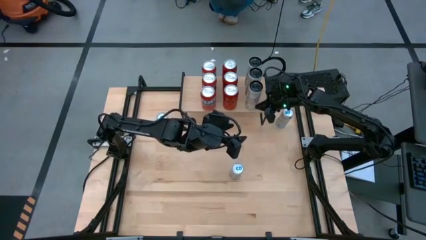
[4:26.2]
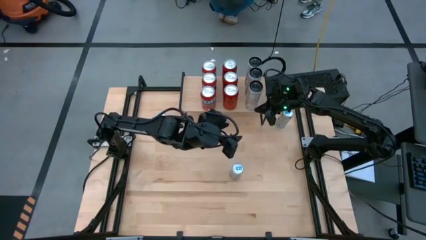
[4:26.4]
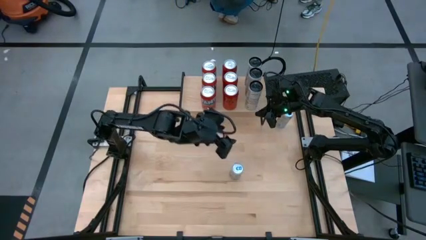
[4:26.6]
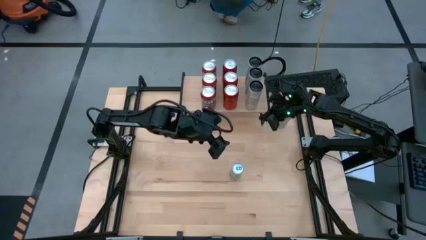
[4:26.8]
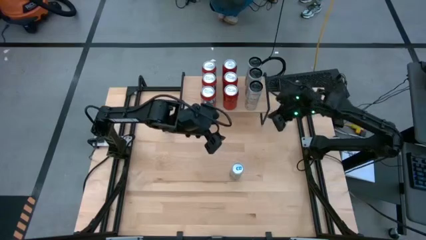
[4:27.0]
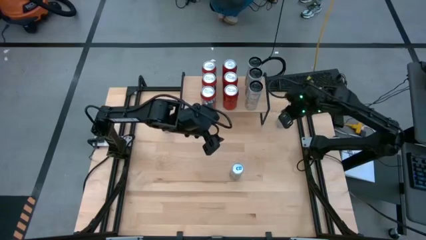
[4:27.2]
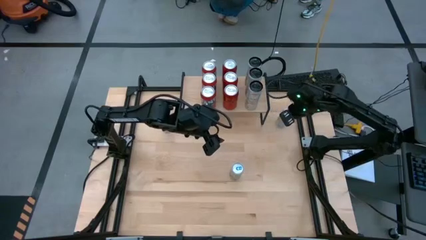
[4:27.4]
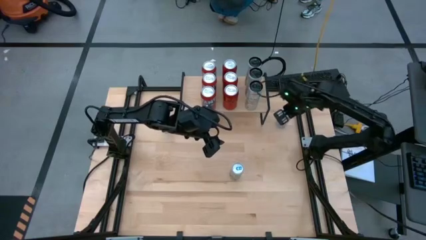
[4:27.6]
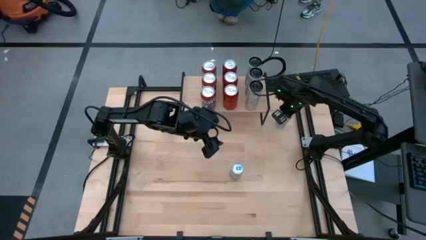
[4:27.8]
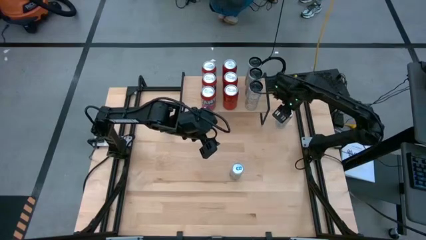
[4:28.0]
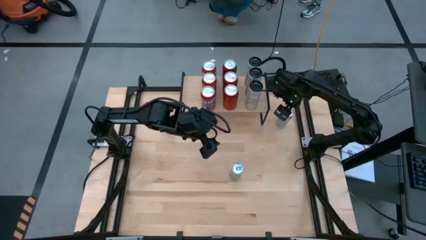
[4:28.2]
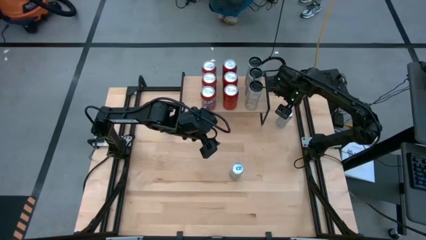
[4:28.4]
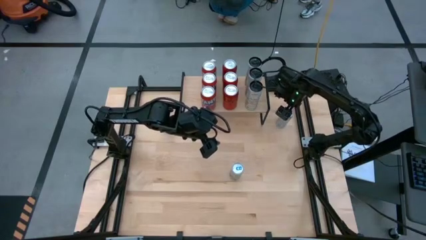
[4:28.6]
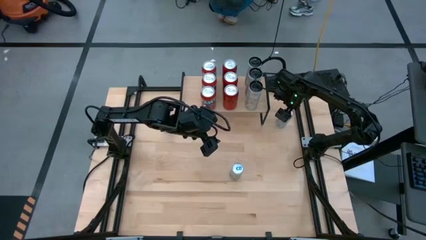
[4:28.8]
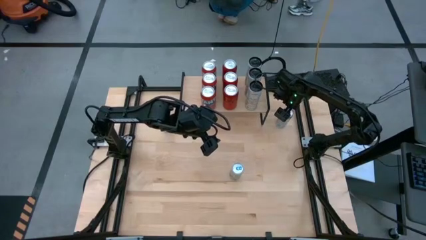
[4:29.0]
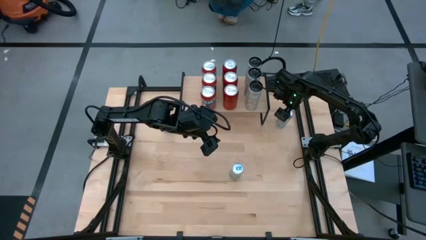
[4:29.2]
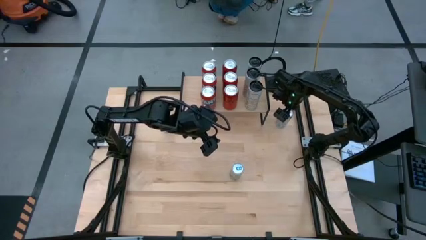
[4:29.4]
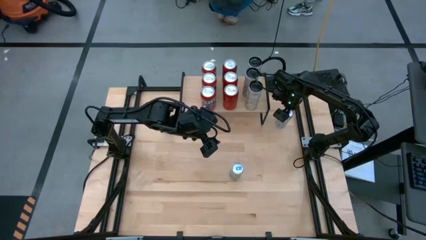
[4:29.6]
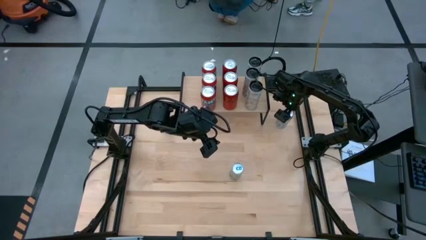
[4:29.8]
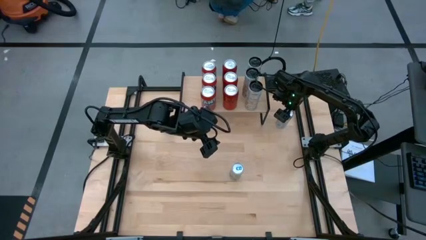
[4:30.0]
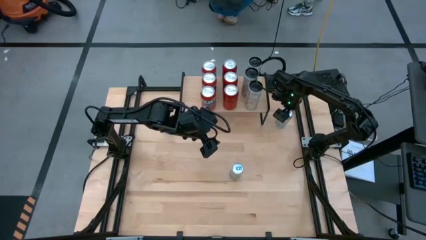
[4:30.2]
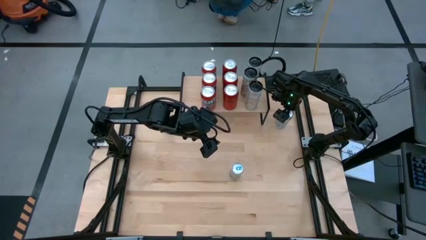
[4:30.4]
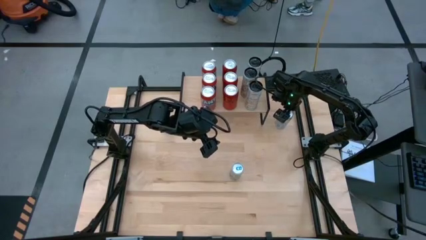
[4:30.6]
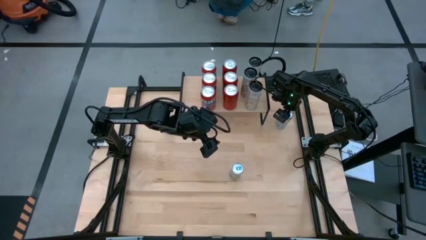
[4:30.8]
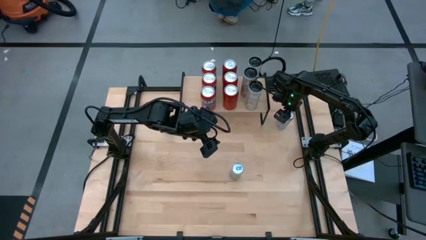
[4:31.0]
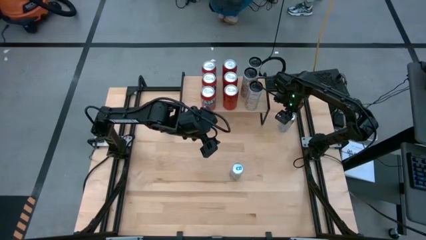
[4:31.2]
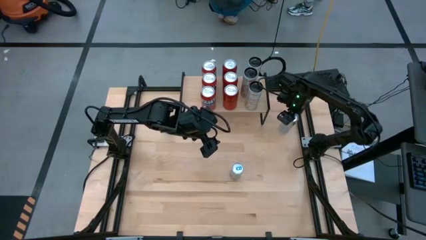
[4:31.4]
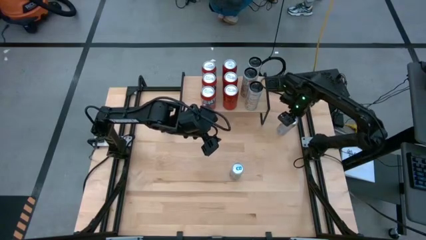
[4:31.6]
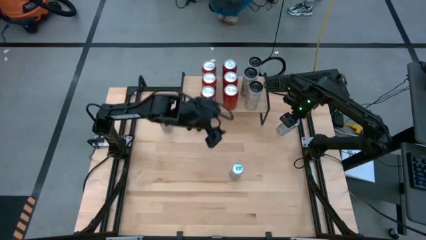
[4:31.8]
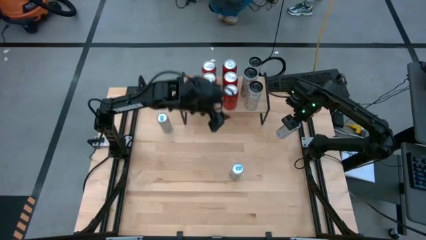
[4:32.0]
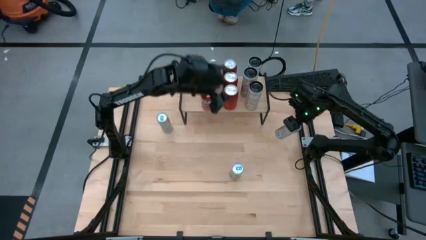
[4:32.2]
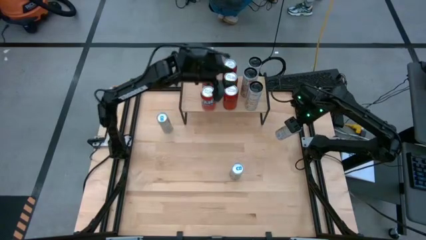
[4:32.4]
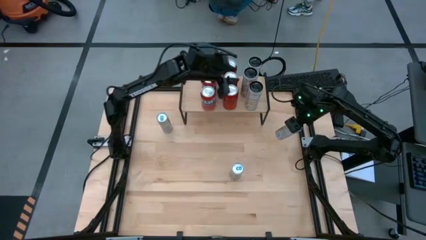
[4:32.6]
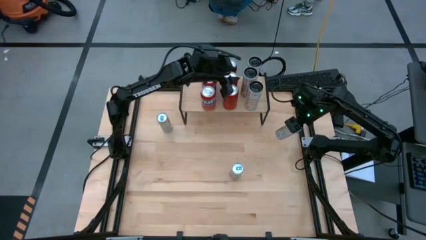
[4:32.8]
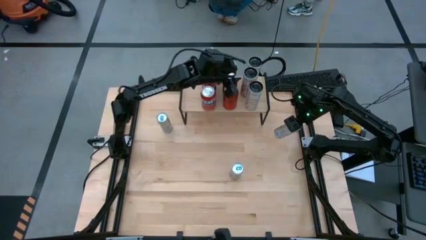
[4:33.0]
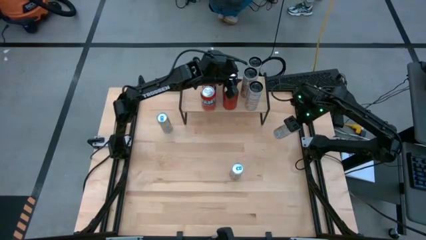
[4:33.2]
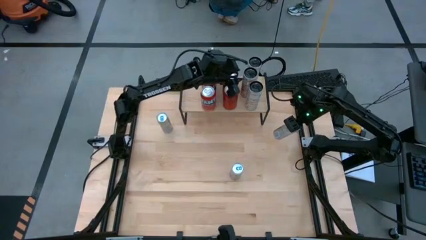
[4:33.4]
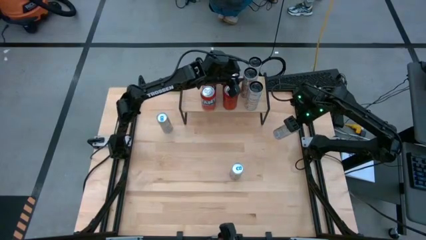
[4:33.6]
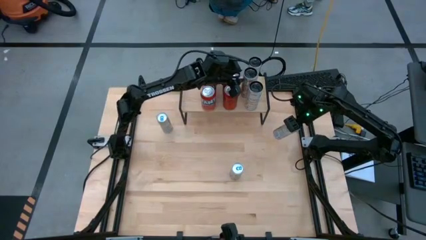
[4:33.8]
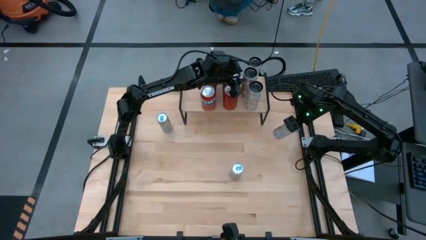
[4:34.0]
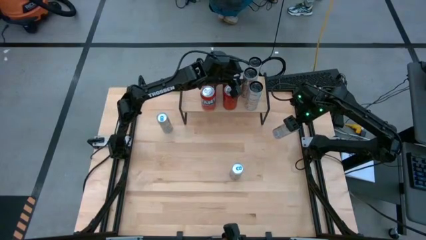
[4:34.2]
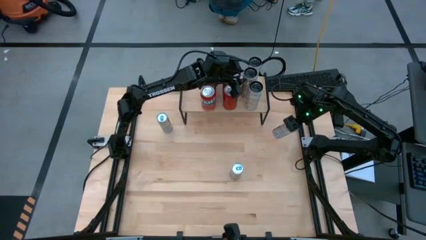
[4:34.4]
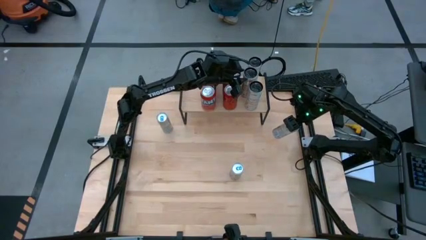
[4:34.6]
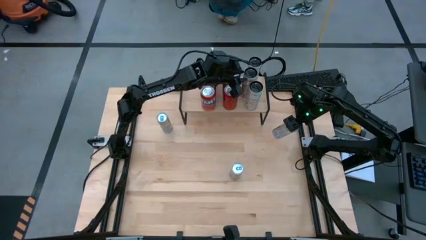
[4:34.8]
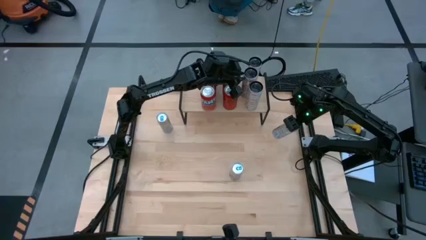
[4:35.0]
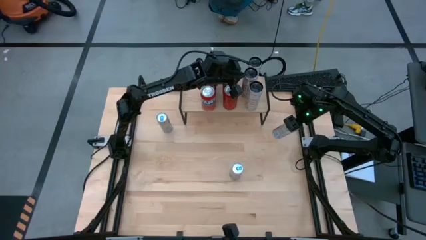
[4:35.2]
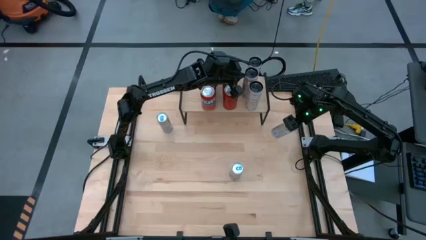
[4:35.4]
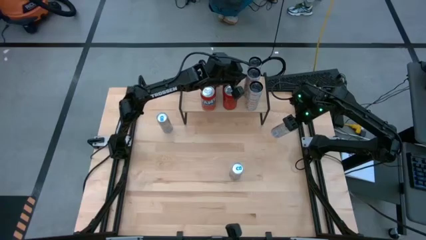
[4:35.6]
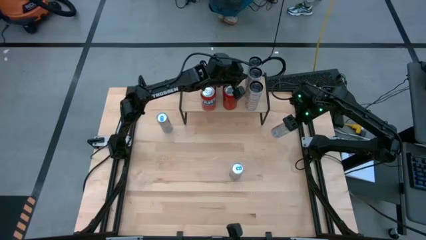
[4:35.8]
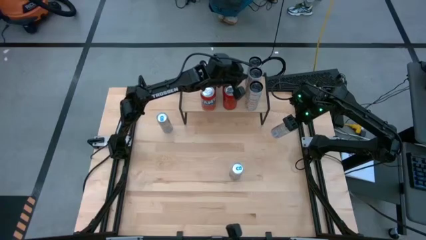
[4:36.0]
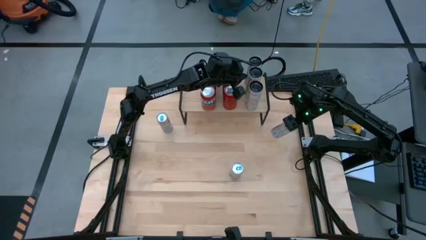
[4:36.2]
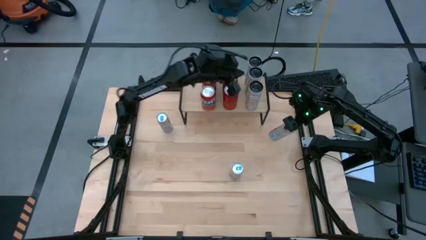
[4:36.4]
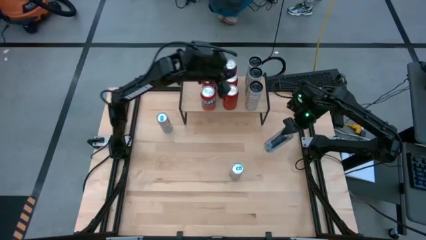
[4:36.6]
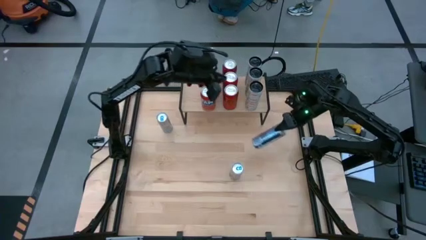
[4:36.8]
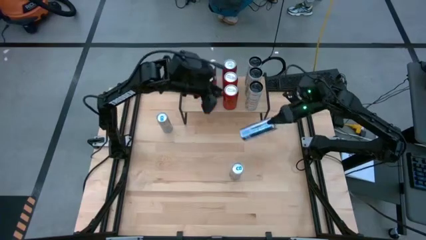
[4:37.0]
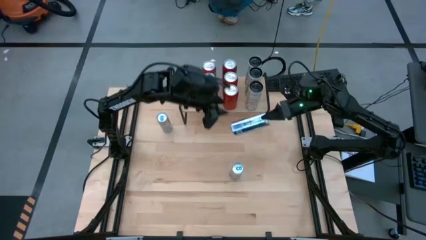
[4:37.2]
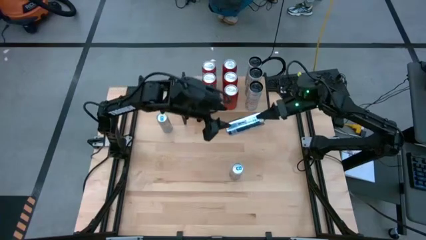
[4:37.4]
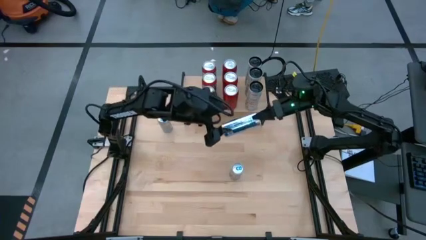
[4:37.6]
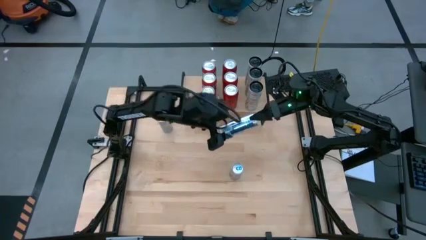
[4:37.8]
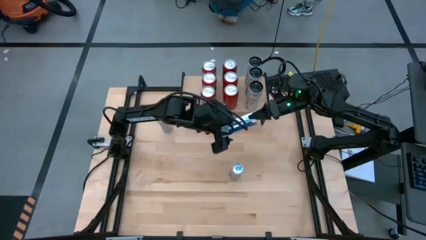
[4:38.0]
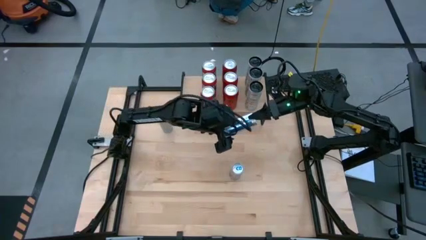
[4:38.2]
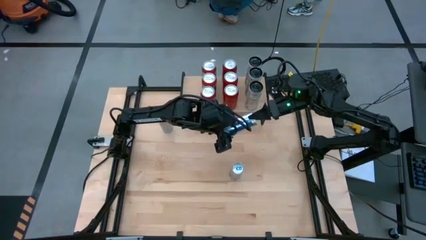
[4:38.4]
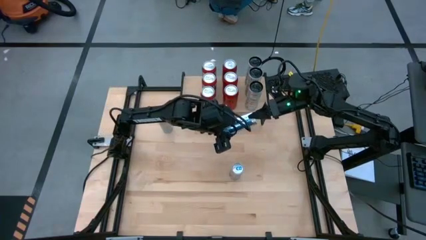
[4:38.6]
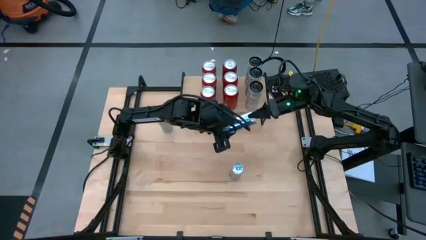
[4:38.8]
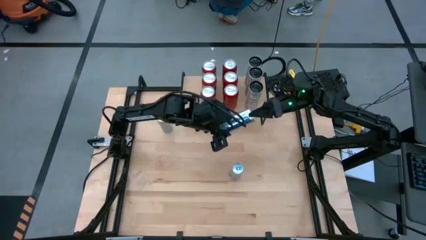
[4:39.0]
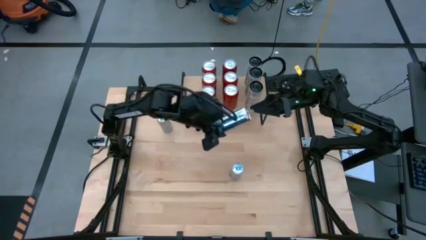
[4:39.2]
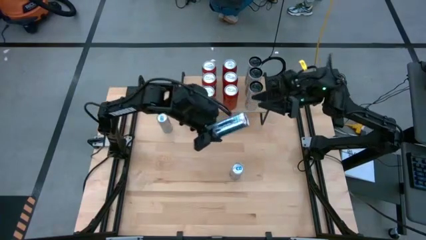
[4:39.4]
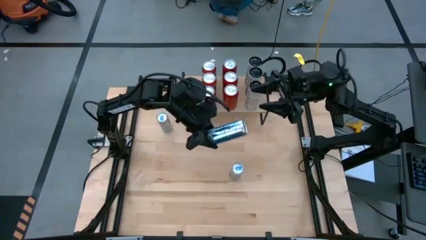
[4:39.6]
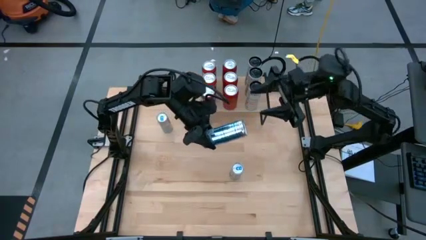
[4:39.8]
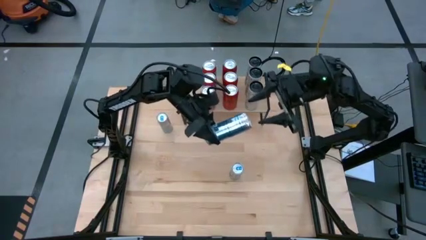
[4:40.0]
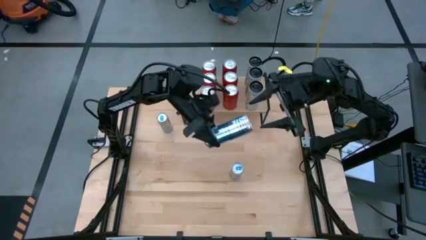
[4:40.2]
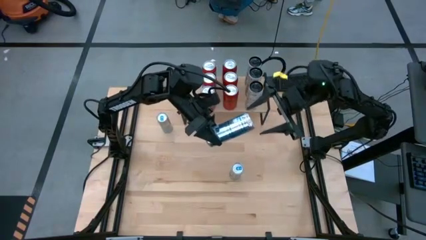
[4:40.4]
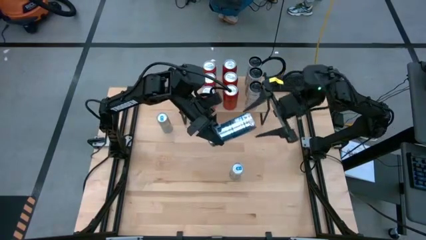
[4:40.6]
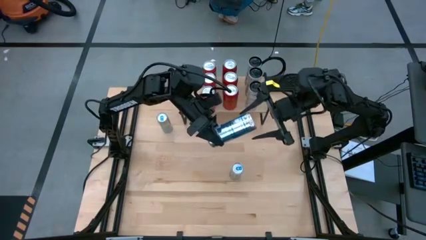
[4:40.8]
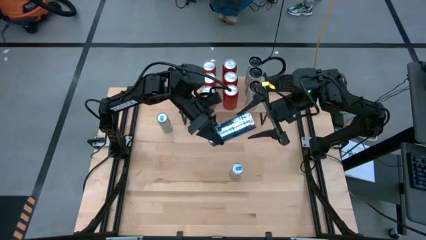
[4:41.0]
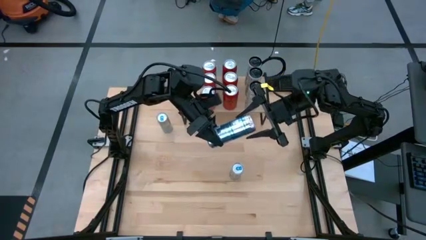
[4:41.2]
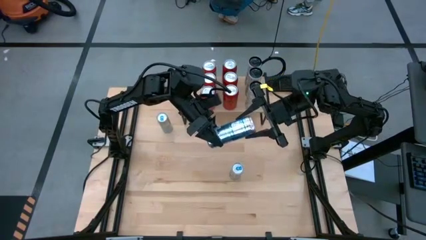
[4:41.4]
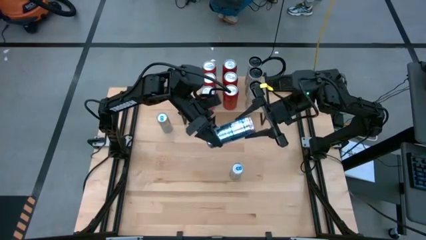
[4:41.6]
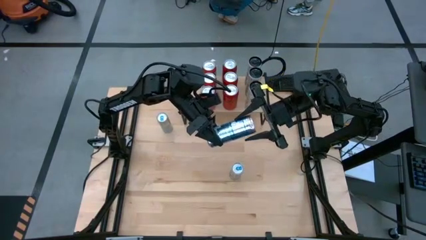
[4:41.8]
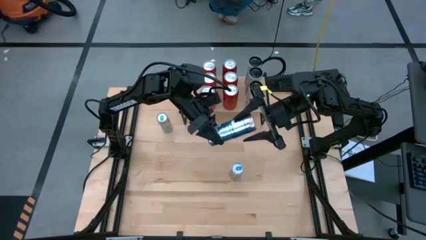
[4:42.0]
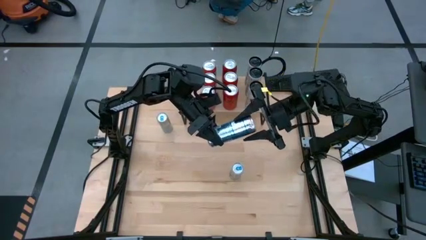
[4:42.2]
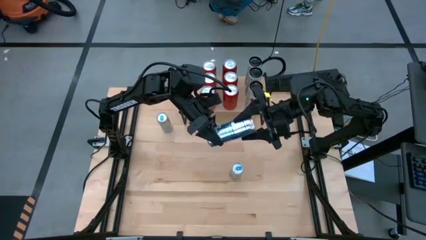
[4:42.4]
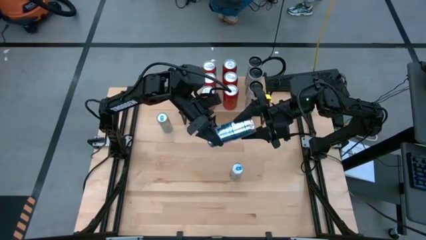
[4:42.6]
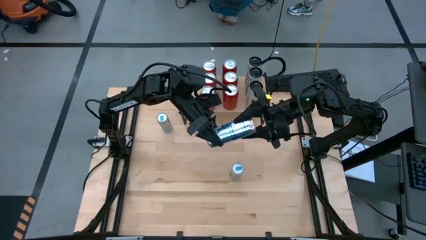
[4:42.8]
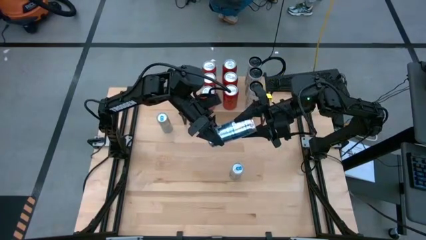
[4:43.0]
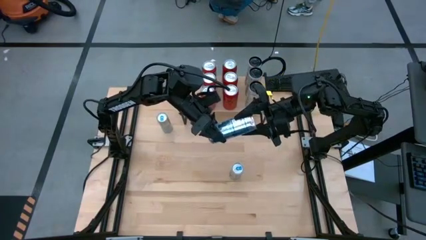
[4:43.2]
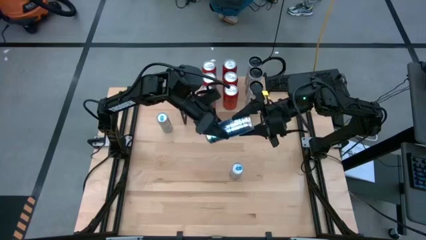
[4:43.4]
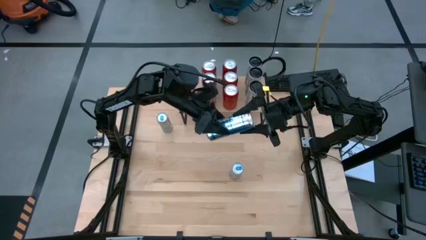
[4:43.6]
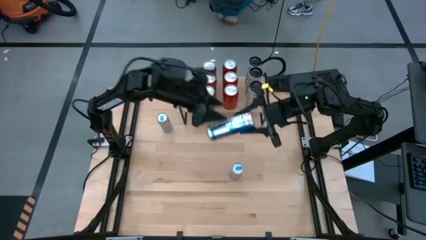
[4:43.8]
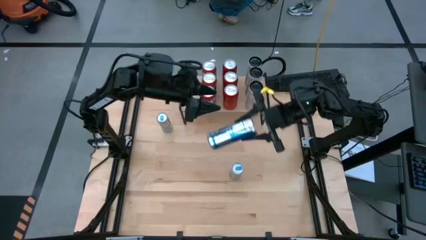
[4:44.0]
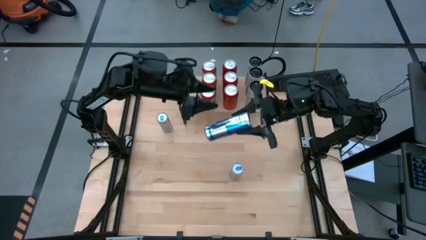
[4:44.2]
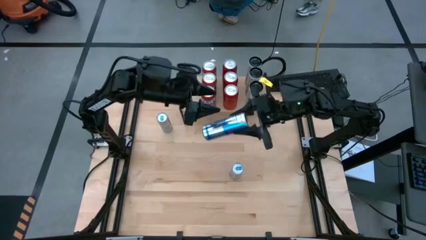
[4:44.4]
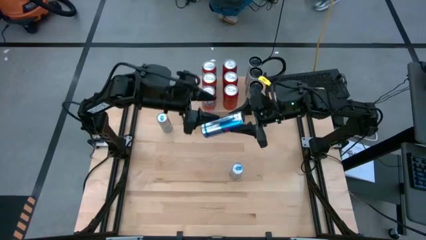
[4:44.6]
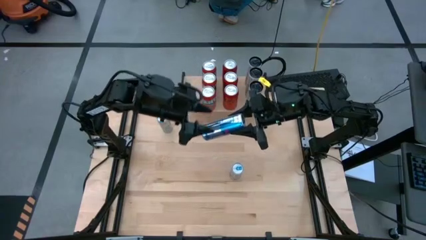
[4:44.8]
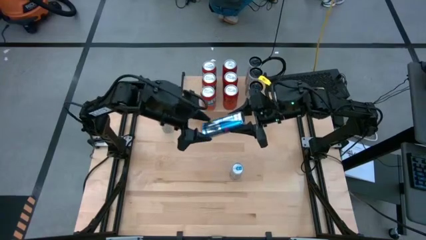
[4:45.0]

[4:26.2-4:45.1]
Task: Place canned beverage on shelf
Put the top right blue soda can on the shelf
